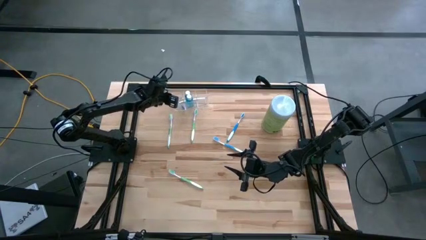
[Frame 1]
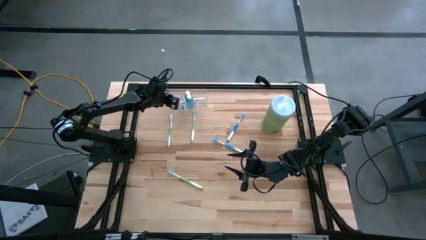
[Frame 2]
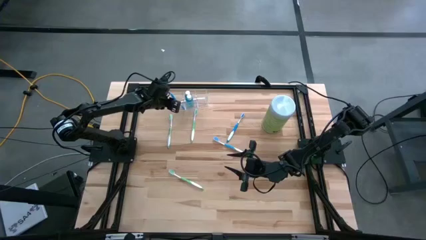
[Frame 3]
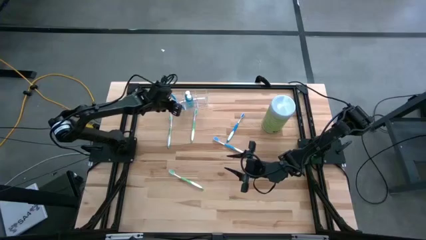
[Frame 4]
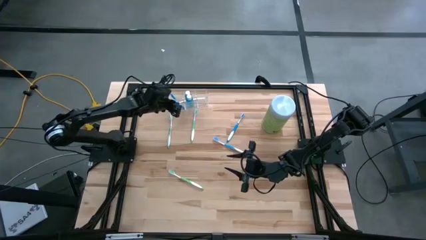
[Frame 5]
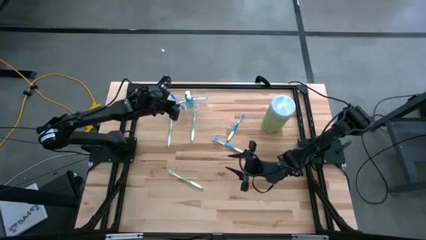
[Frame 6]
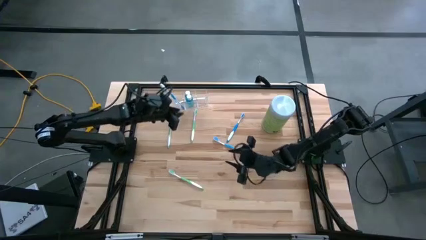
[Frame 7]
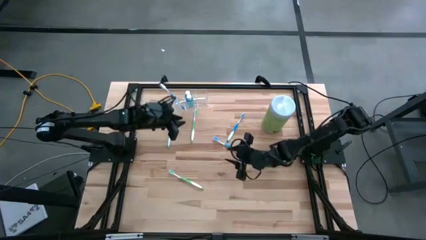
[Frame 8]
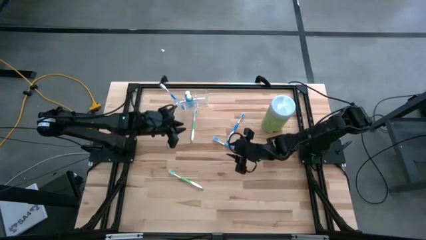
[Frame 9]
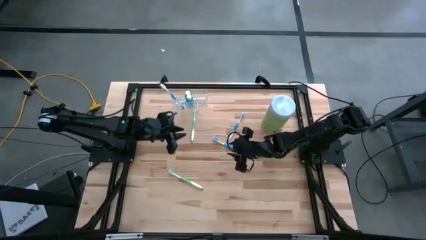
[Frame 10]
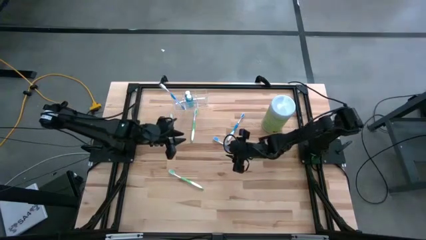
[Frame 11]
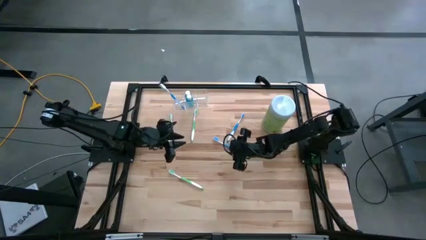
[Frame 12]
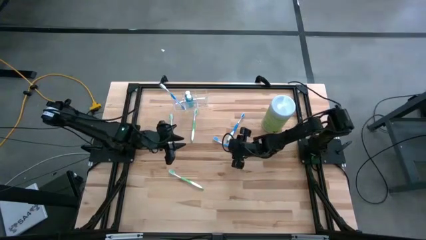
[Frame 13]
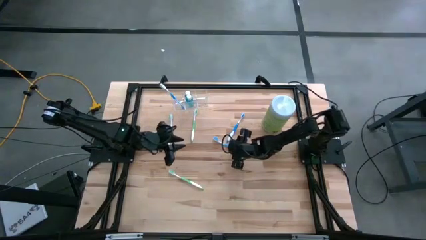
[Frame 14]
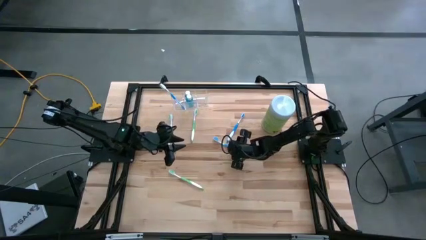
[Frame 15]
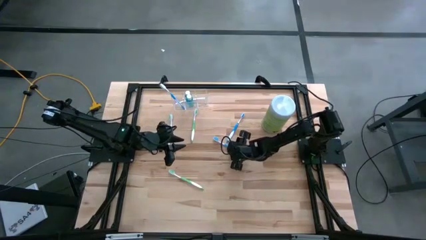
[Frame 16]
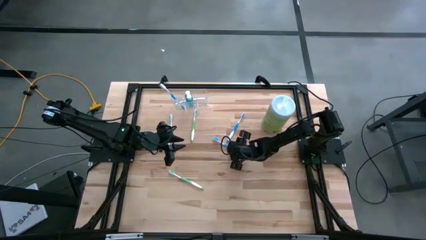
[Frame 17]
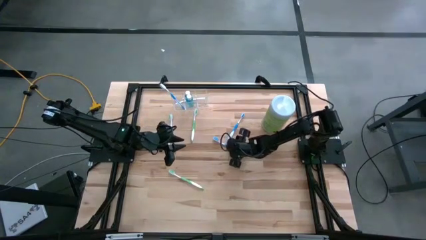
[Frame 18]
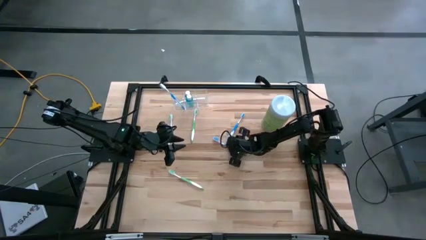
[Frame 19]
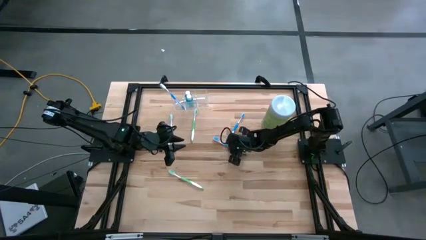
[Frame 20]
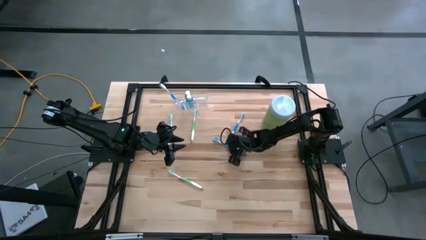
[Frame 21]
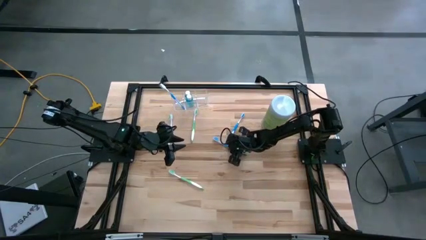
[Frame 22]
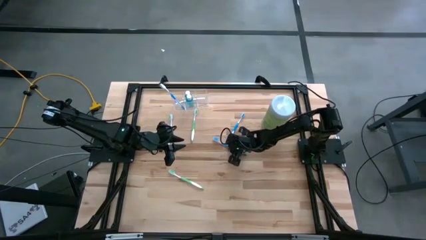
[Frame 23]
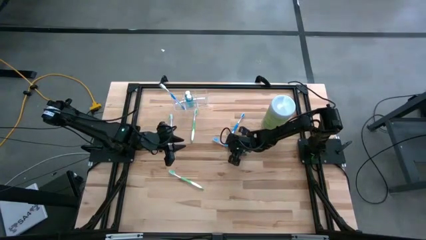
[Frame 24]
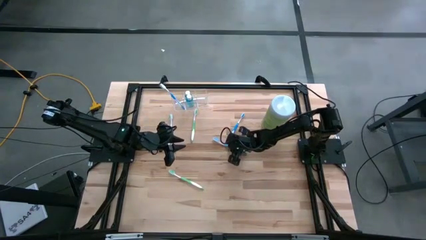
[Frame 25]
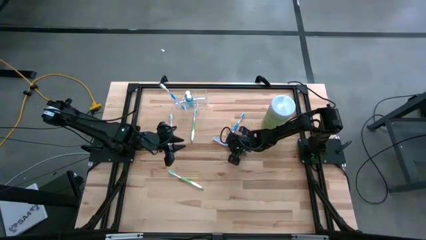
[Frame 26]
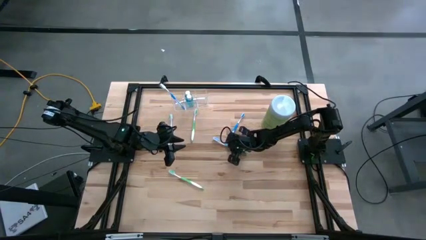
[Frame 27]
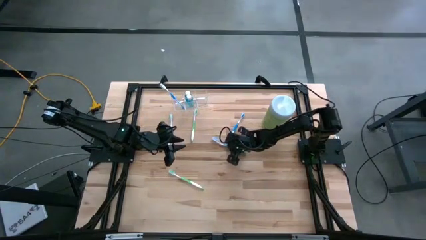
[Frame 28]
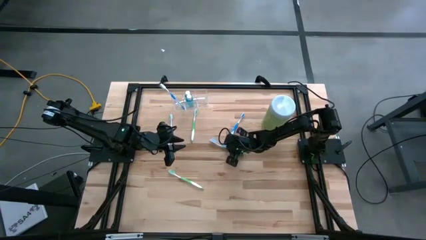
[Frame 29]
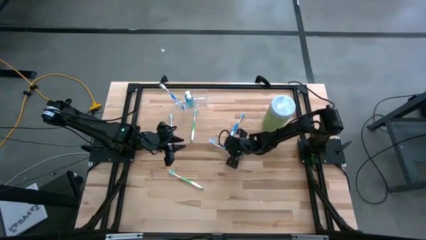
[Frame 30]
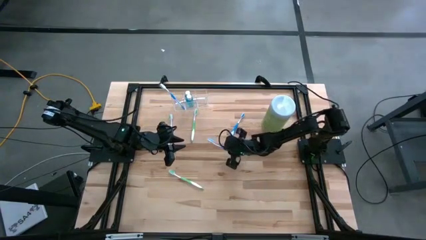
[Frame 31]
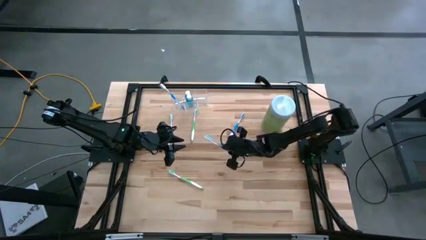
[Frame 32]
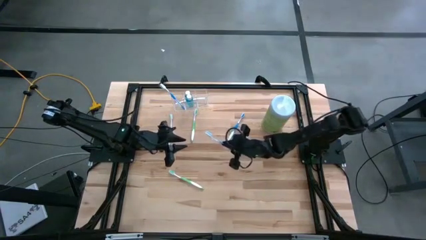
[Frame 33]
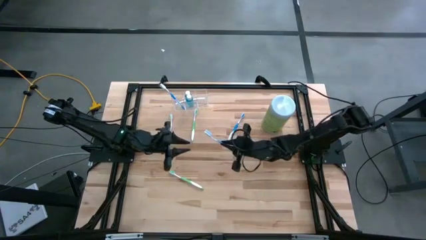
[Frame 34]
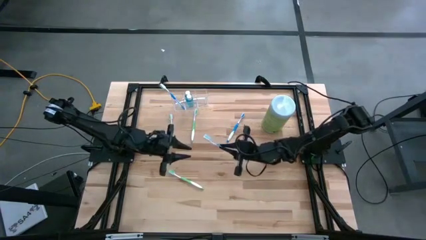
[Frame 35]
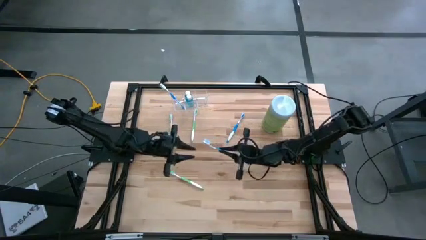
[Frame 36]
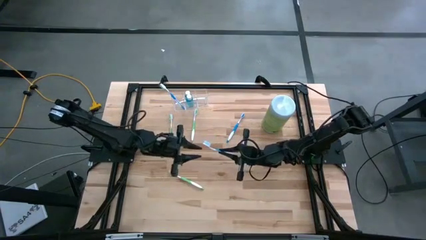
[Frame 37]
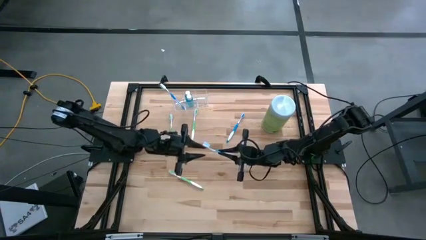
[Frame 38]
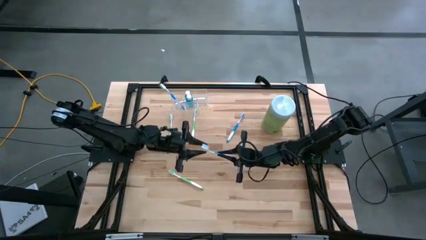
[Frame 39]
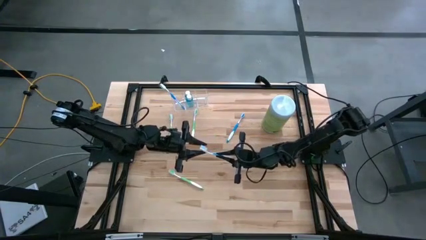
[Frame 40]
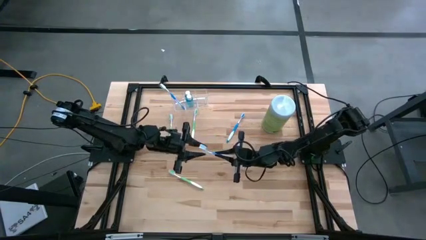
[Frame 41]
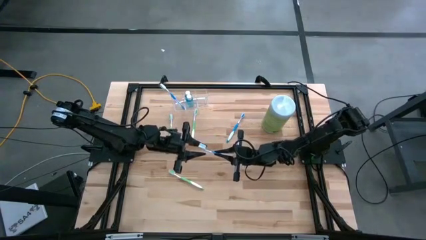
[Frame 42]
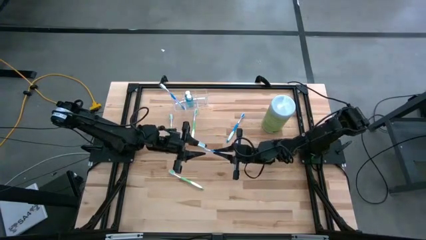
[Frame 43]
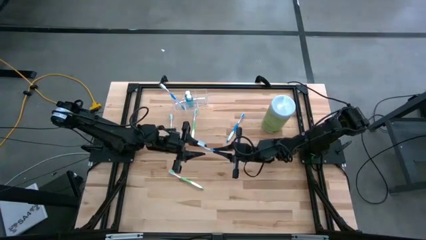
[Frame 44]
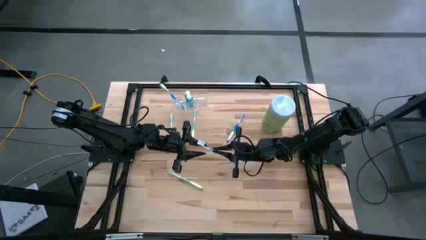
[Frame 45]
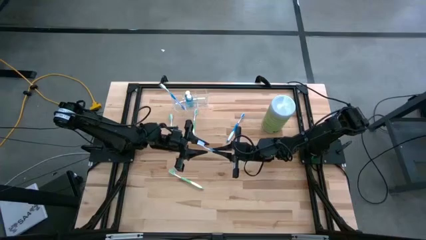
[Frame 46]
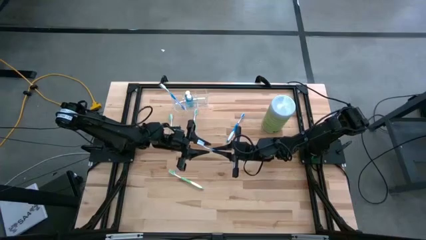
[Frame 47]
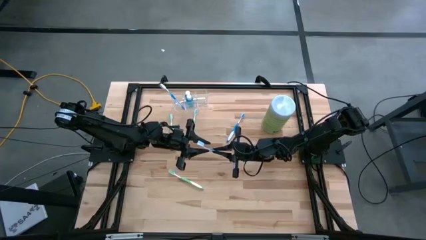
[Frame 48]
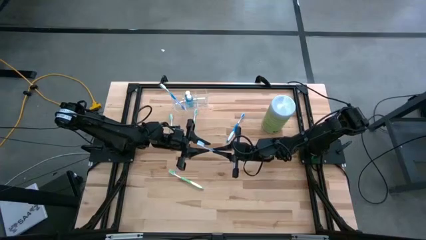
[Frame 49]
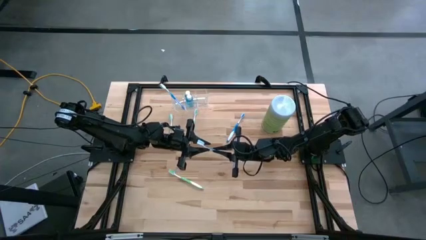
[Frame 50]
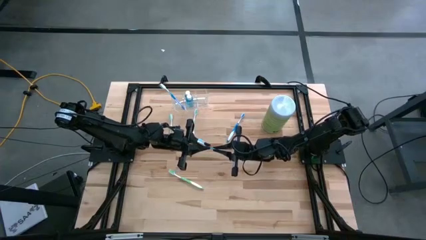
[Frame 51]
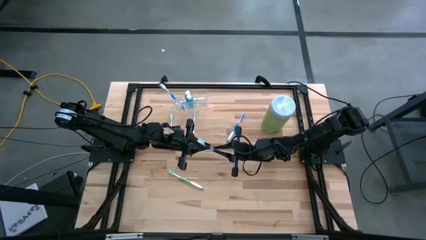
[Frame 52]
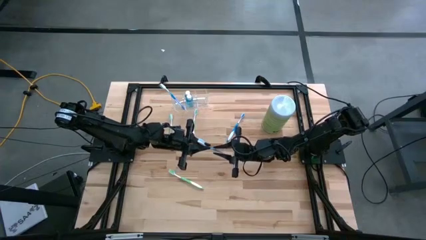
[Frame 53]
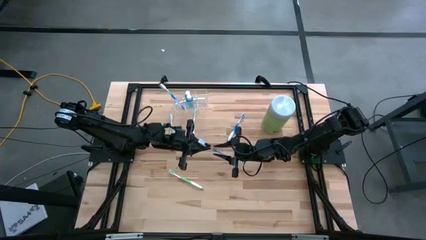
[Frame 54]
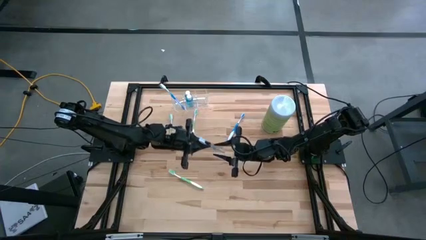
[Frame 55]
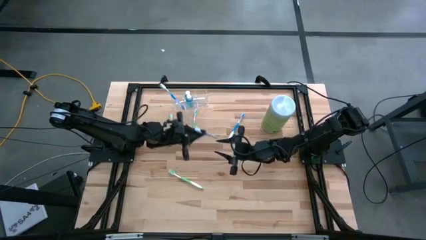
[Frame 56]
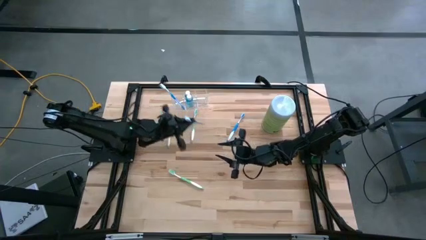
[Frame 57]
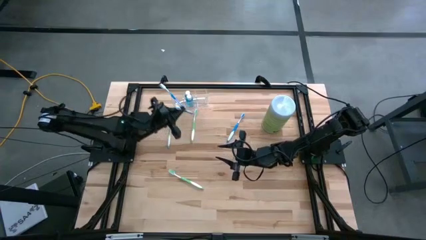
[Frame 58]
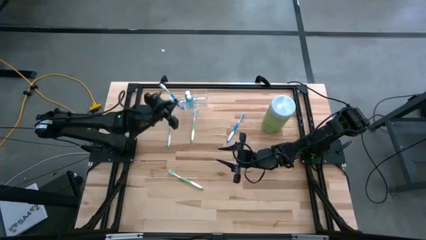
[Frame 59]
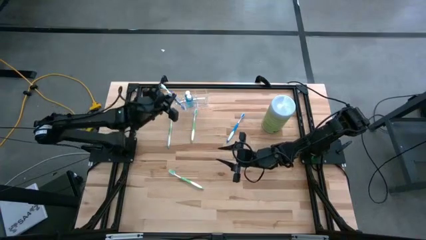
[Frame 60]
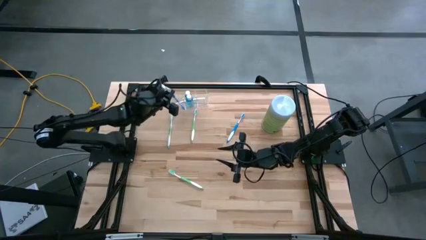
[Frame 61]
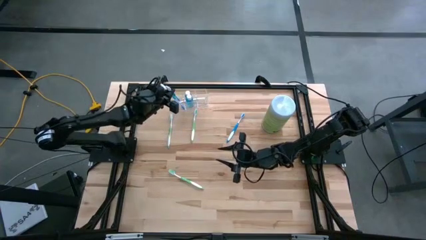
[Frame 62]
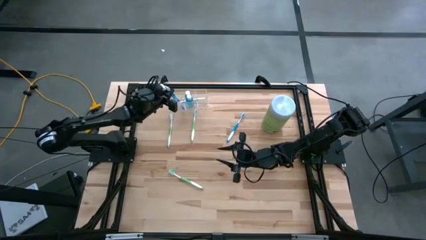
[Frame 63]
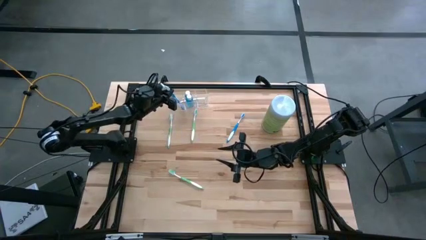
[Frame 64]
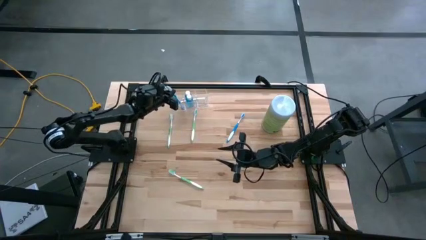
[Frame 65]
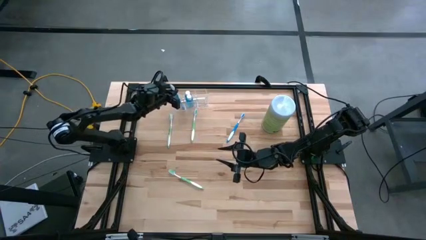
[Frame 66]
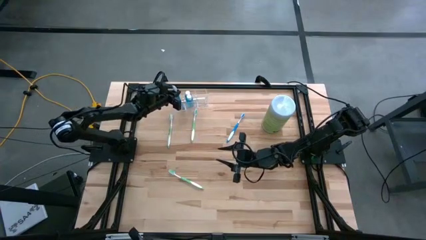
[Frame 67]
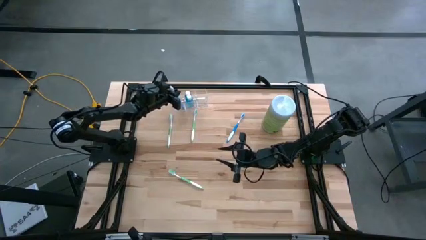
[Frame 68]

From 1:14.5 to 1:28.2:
Task: Pick & Place toothbrushing station
Put the bottom blue toothbrush into the left section of the transparent organizer

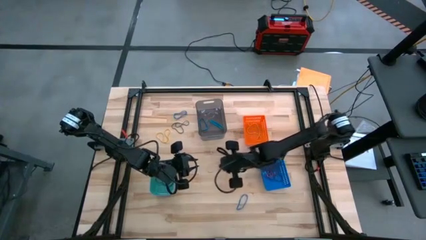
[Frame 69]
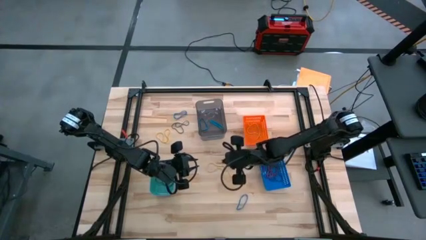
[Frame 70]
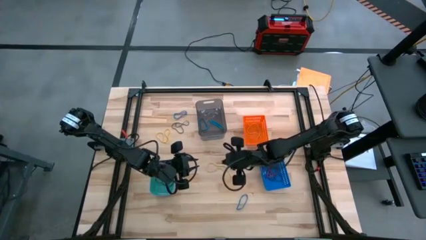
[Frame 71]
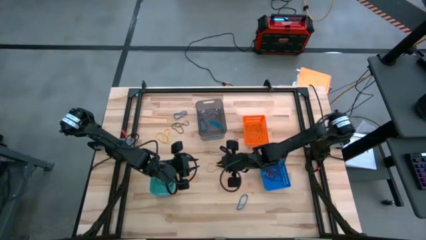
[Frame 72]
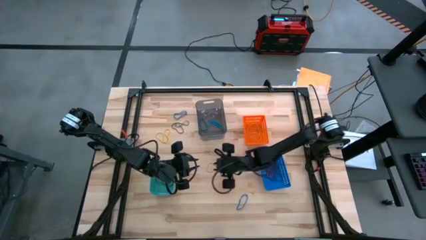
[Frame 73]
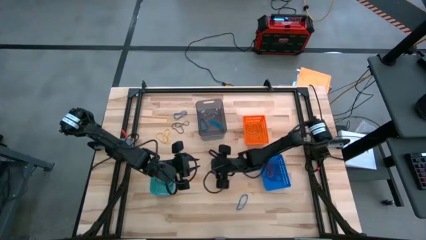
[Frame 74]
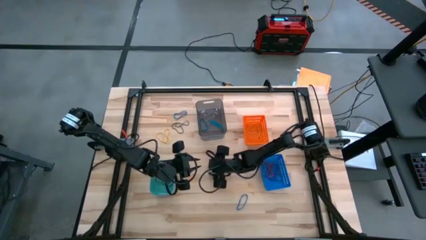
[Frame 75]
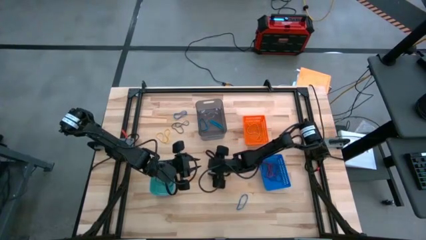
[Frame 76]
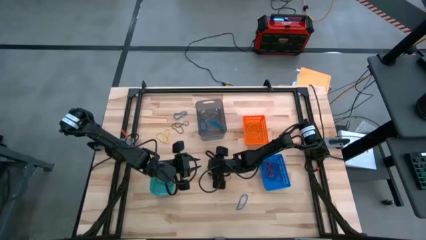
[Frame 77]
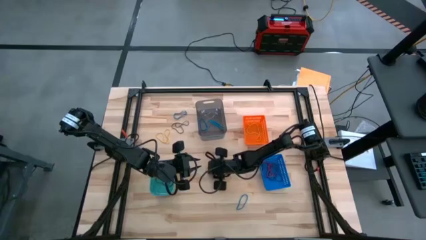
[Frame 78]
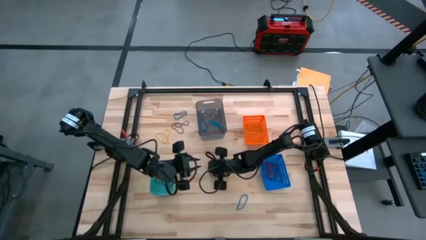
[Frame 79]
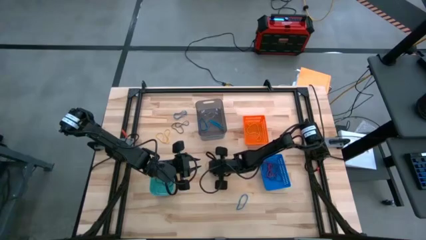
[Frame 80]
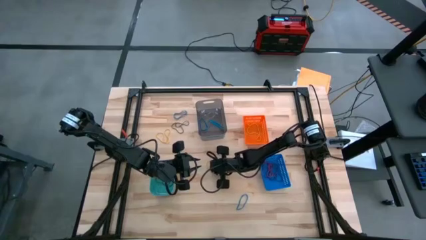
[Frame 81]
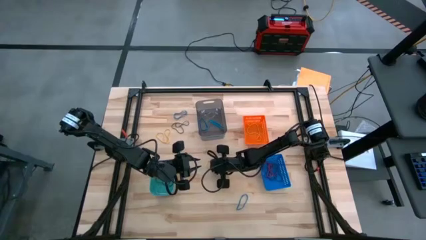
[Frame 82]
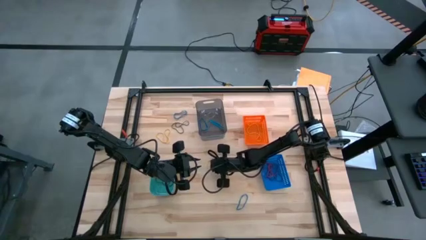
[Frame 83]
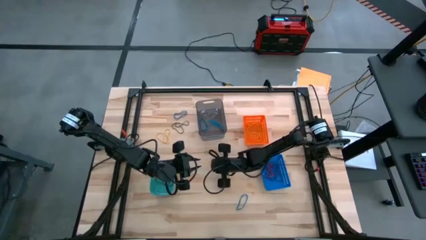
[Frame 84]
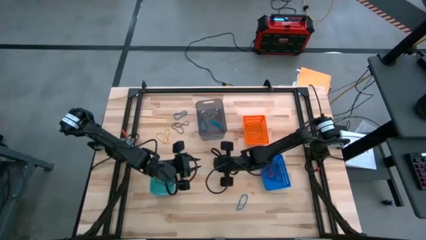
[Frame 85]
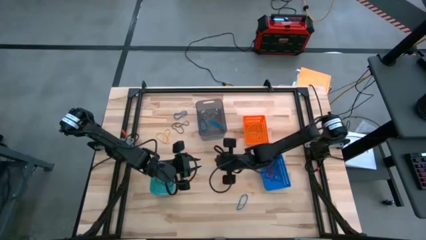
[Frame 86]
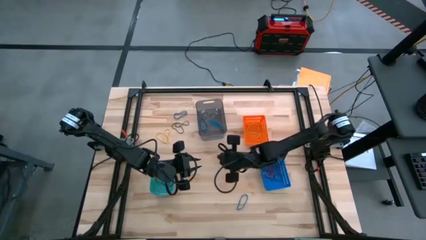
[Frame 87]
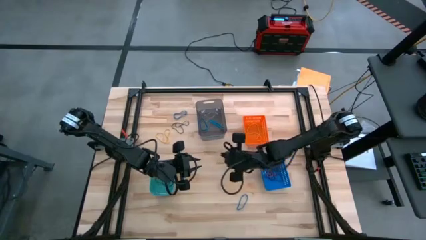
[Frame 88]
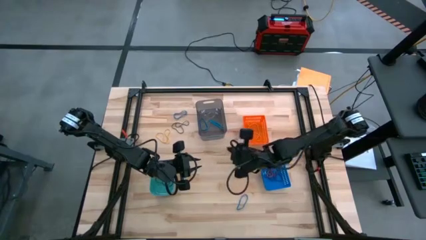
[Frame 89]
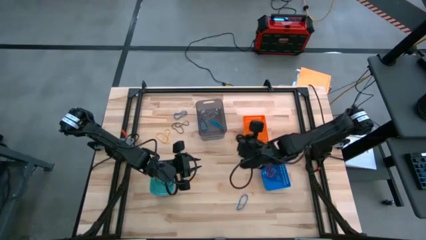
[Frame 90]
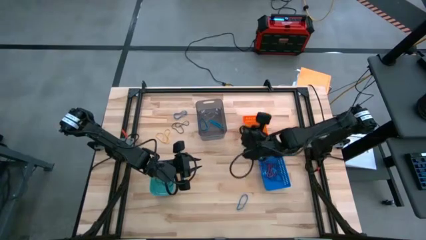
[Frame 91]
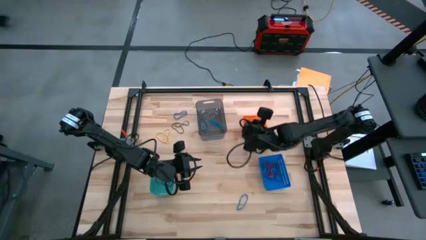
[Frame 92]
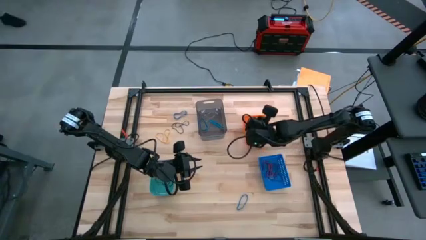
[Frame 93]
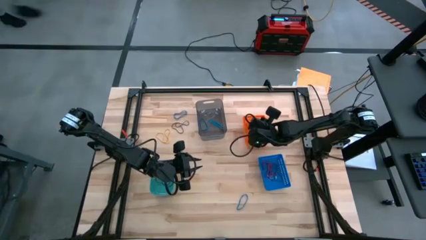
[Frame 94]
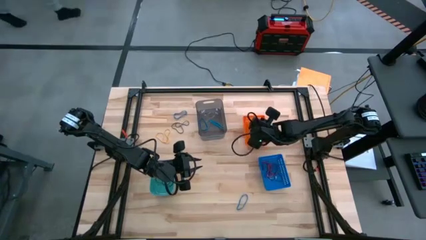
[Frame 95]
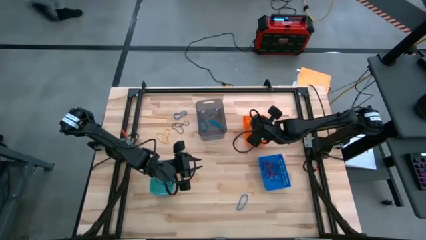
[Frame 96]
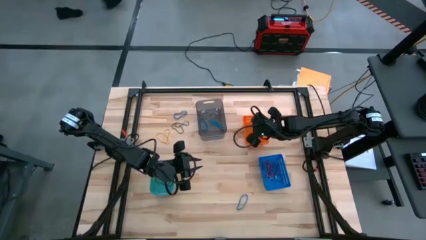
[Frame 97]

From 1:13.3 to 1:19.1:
Task: Sort rubber bands into baskets
Put the yellow rubber band into the orange bin
